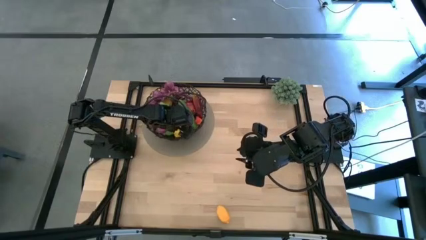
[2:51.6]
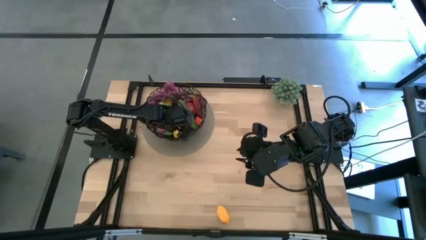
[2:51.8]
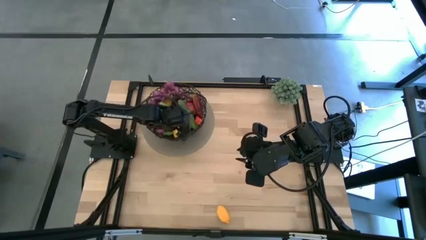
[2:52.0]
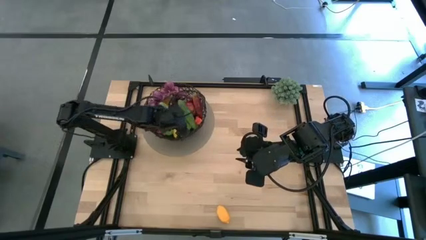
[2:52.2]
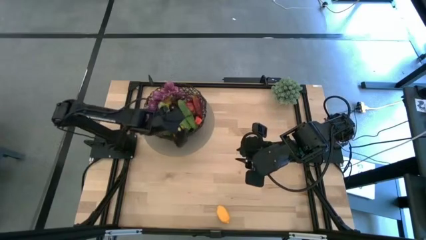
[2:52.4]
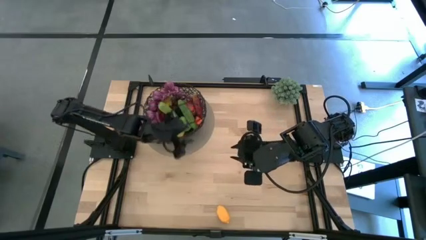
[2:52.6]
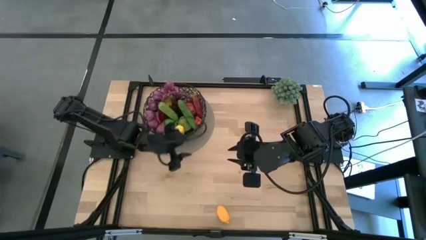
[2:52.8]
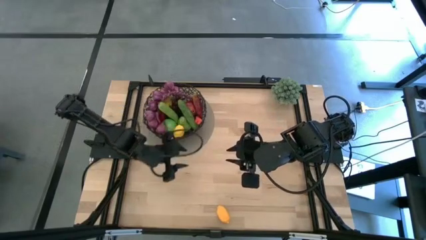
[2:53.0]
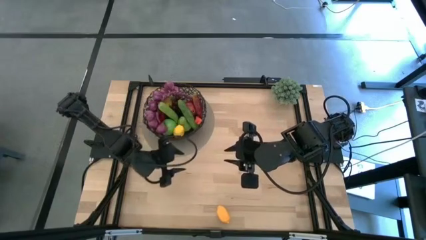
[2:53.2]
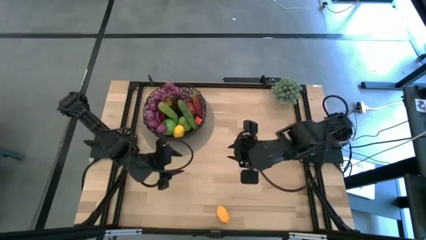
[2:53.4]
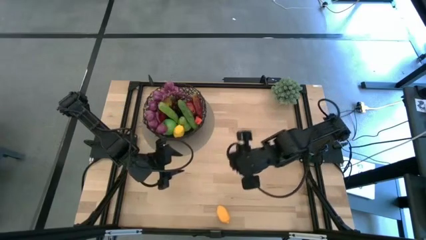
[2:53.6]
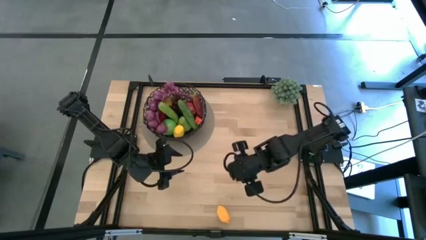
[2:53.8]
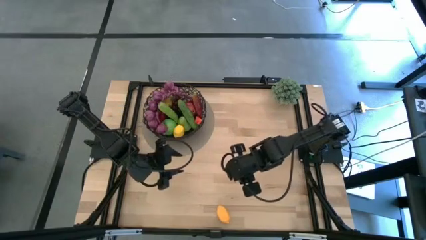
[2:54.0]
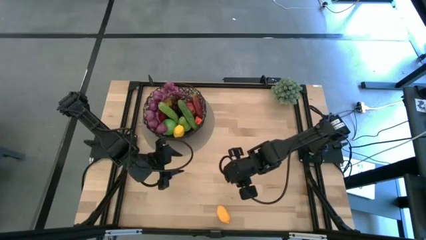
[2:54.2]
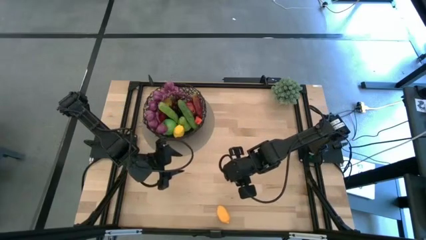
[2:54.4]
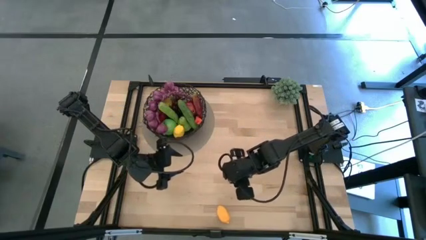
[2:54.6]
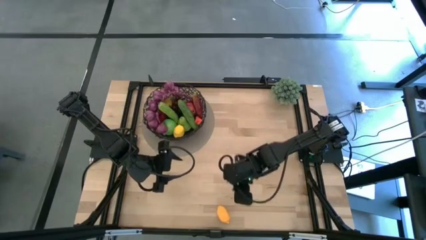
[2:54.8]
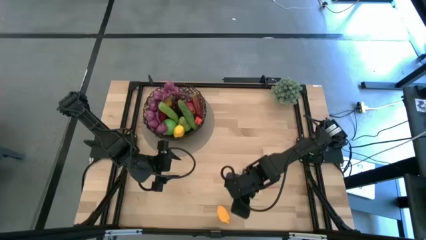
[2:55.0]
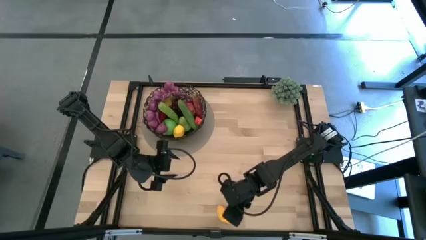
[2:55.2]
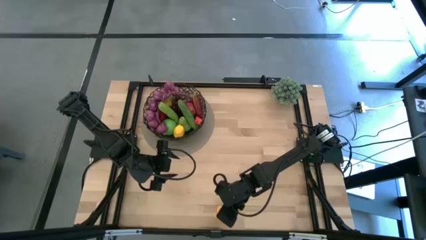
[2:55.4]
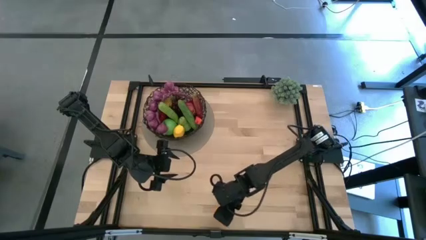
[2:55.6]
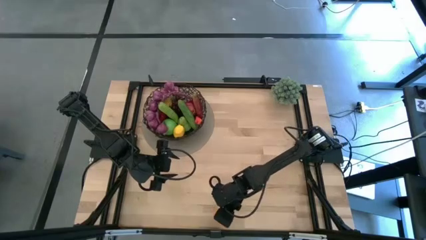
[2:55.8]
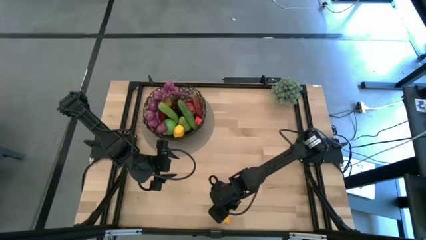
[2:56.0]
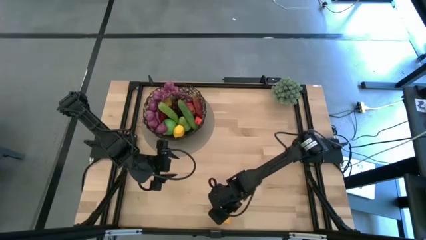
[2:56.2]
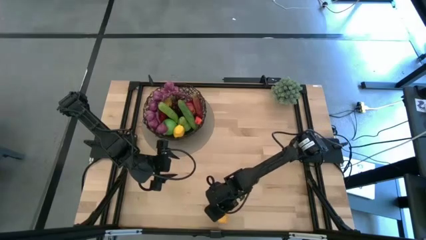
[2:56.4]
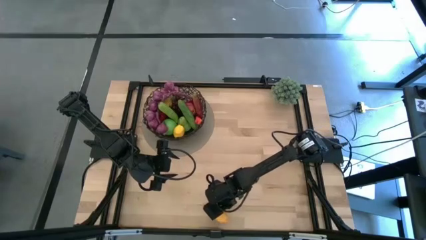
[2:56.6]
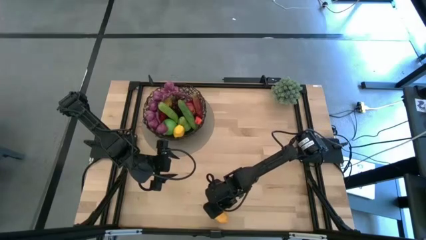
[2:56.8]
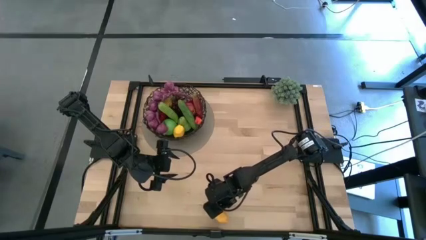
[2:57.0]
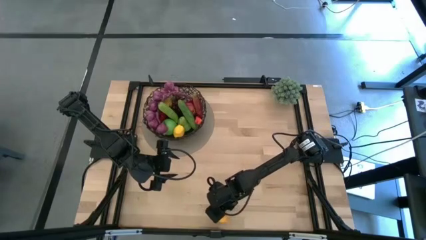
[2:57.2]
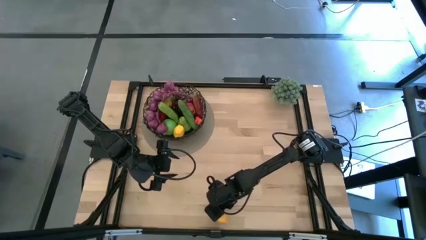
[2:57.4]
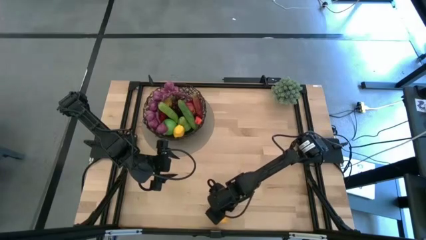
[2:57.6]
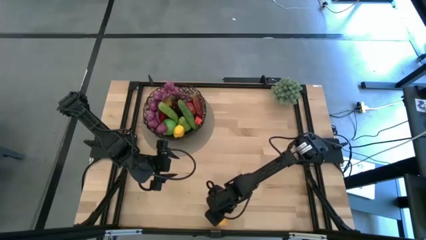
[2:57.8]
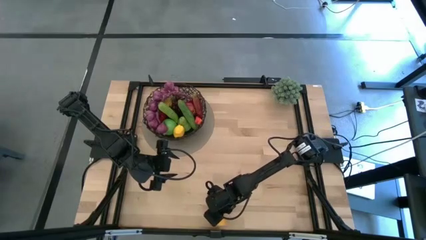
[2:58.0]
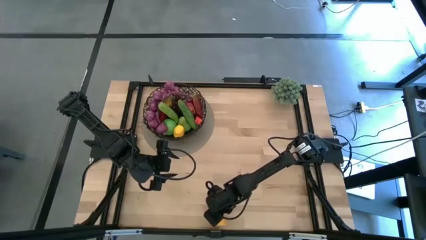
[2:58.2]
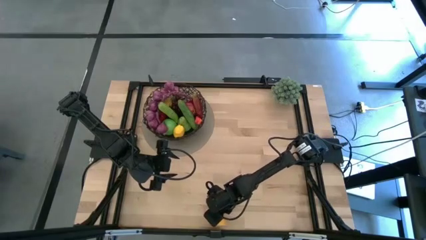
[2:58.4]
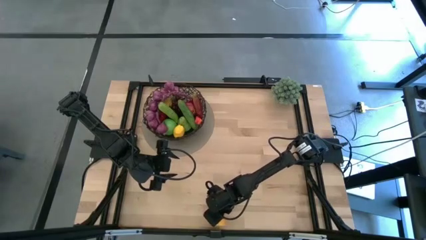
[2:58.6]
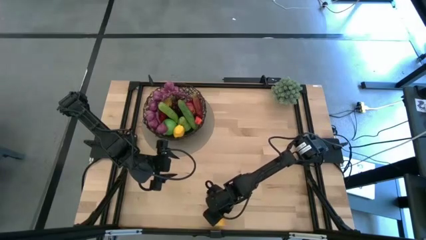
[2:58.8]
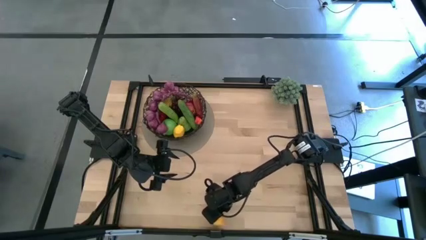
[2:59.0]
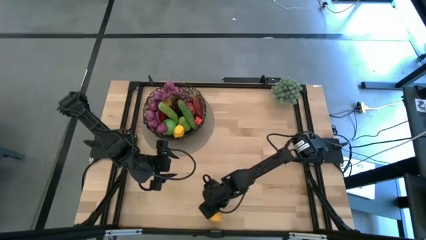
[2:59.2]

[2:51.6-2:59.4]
Task: Build produce basket
Put the yellow lemon into the black wire basket

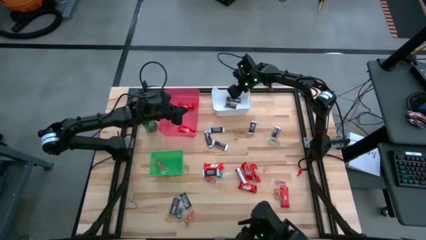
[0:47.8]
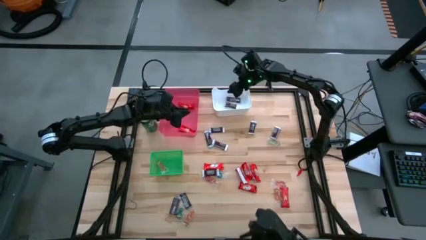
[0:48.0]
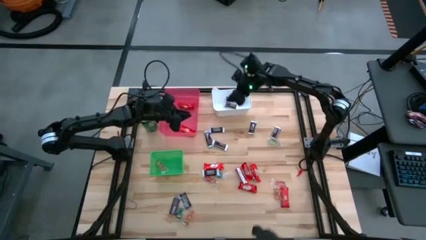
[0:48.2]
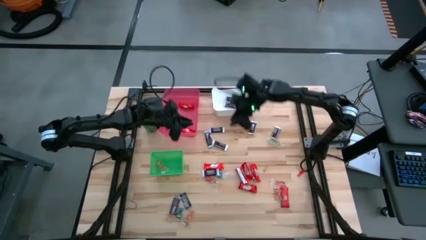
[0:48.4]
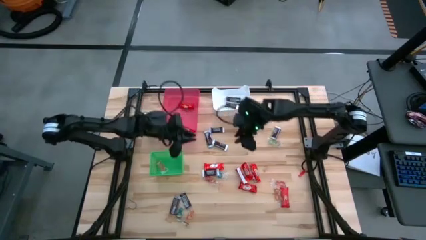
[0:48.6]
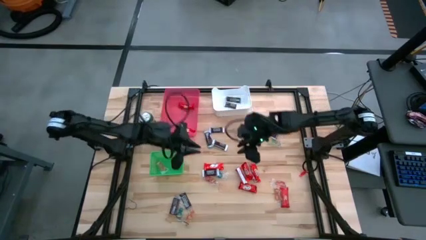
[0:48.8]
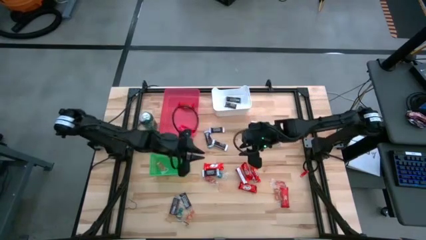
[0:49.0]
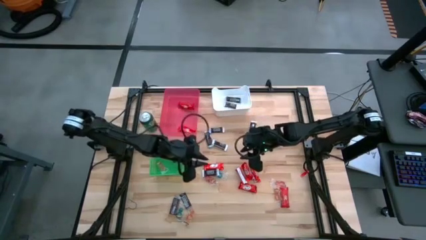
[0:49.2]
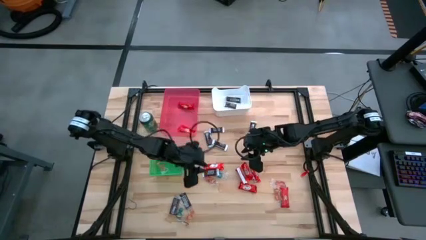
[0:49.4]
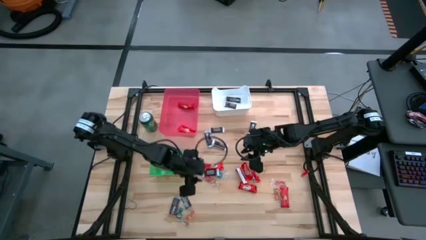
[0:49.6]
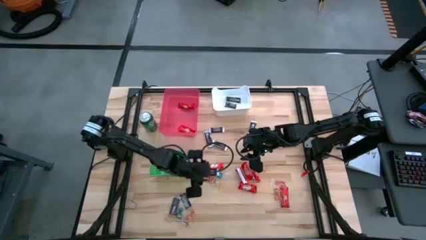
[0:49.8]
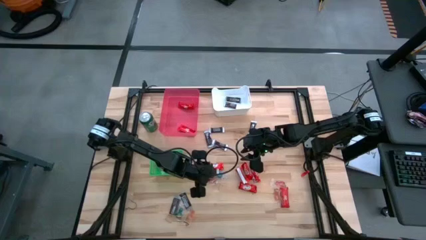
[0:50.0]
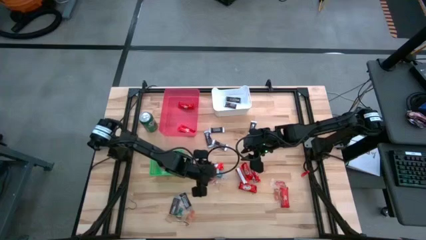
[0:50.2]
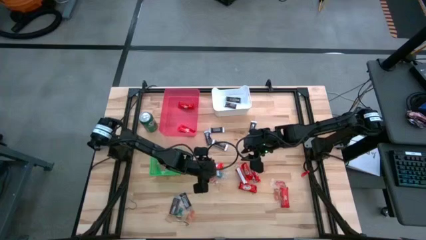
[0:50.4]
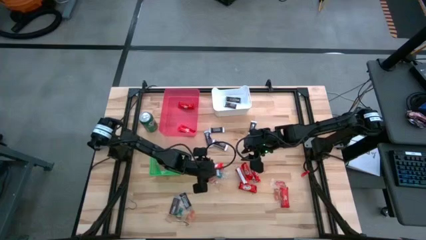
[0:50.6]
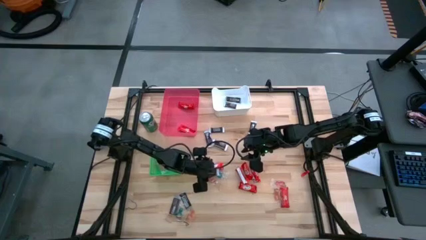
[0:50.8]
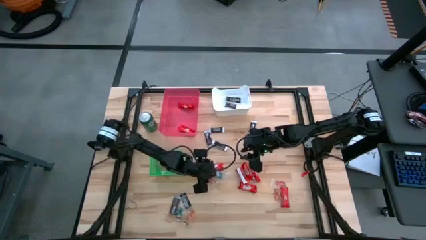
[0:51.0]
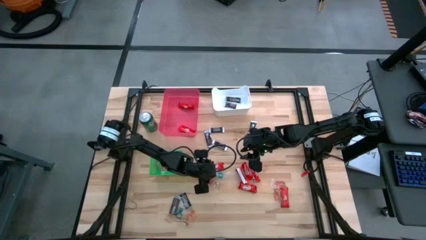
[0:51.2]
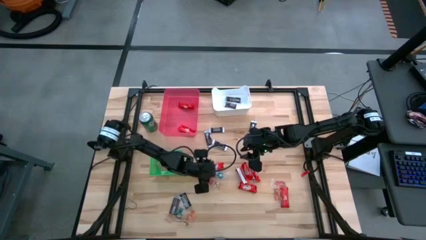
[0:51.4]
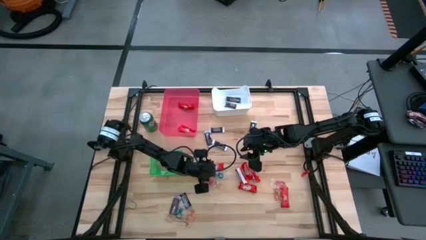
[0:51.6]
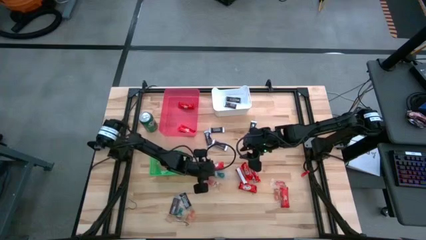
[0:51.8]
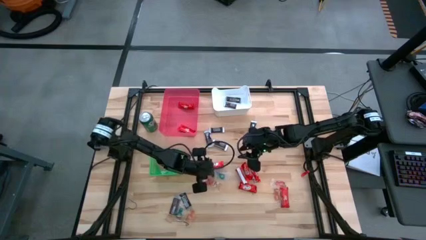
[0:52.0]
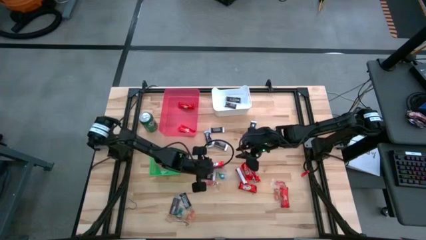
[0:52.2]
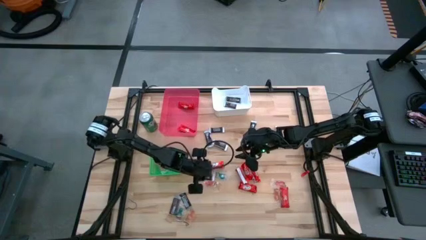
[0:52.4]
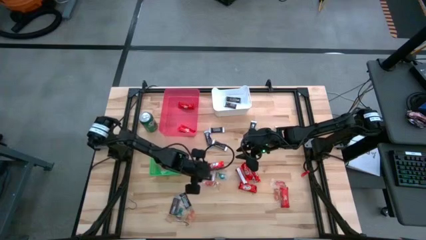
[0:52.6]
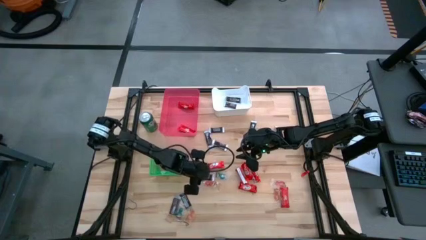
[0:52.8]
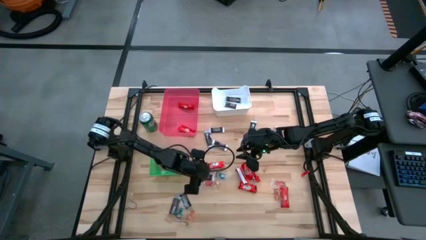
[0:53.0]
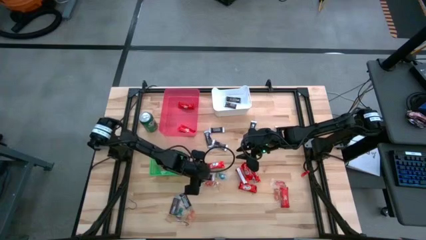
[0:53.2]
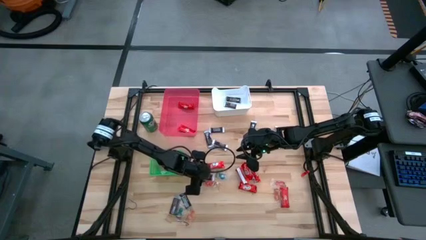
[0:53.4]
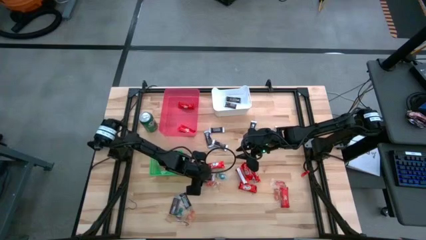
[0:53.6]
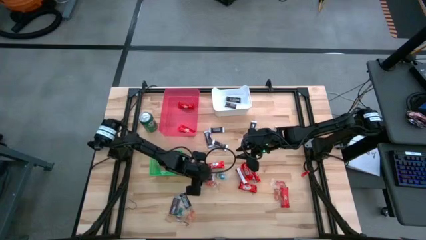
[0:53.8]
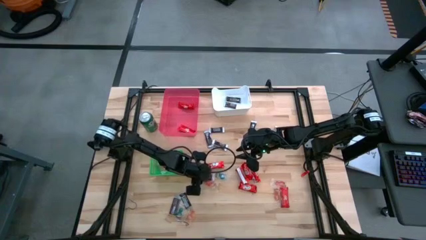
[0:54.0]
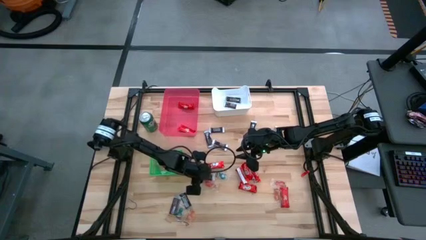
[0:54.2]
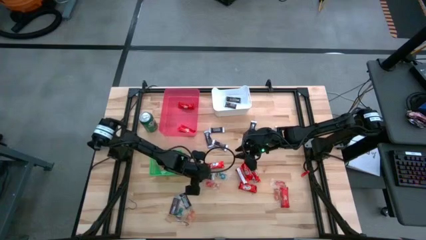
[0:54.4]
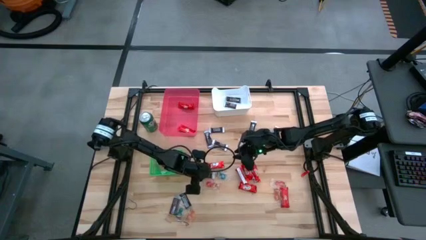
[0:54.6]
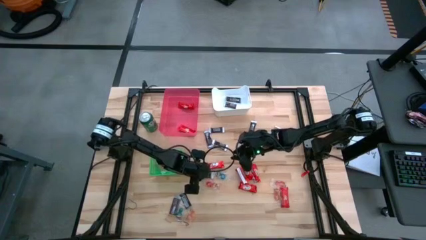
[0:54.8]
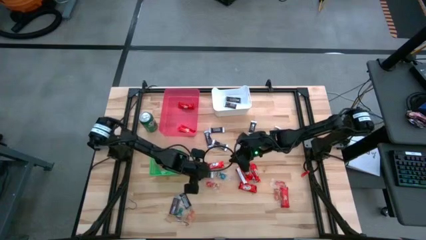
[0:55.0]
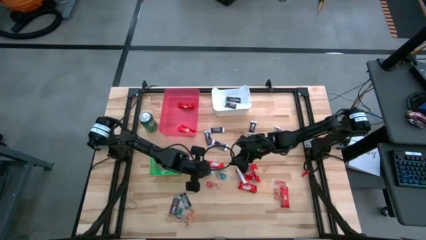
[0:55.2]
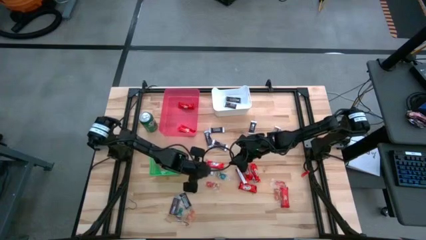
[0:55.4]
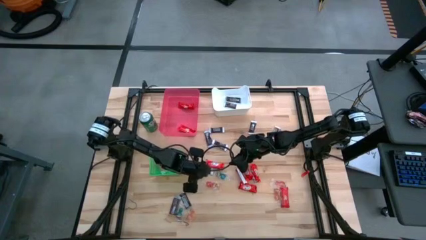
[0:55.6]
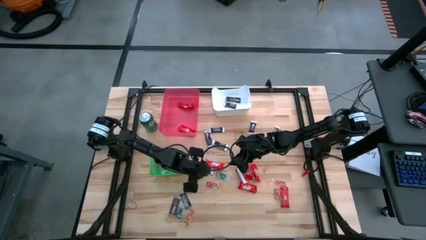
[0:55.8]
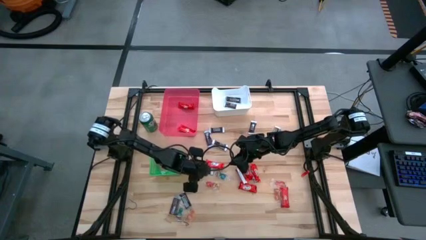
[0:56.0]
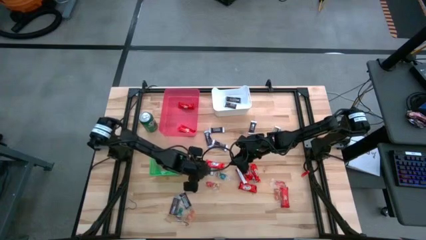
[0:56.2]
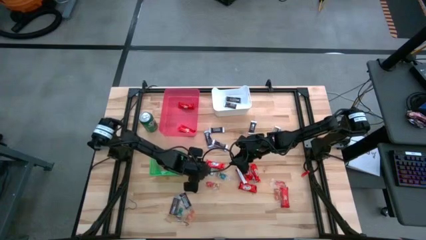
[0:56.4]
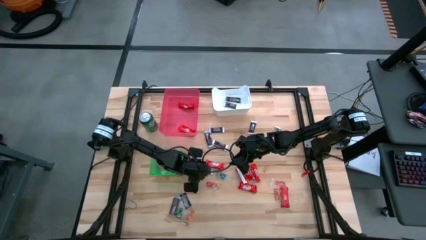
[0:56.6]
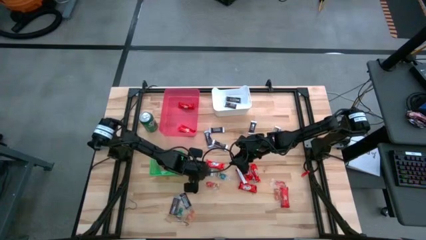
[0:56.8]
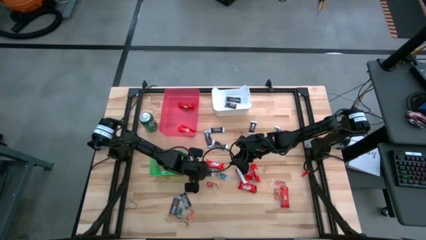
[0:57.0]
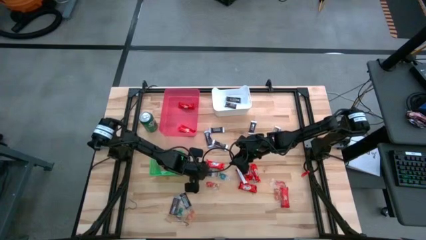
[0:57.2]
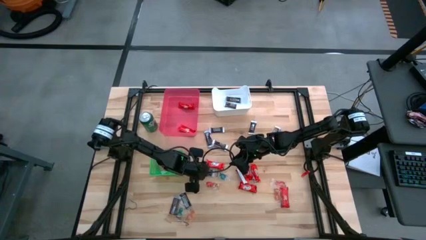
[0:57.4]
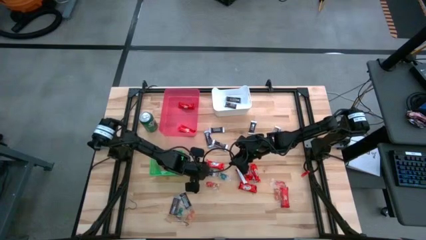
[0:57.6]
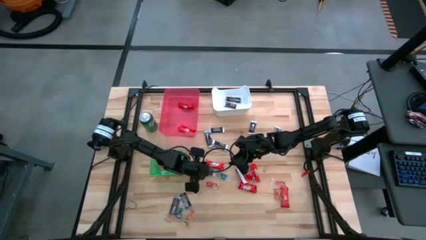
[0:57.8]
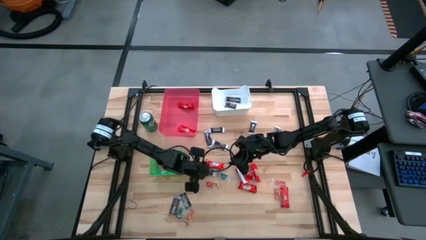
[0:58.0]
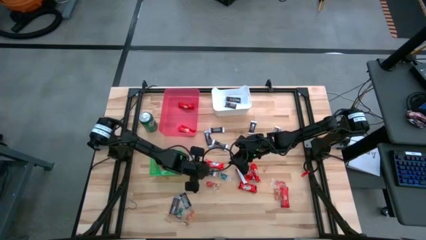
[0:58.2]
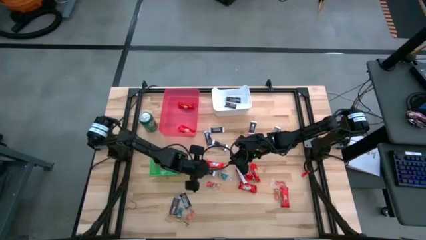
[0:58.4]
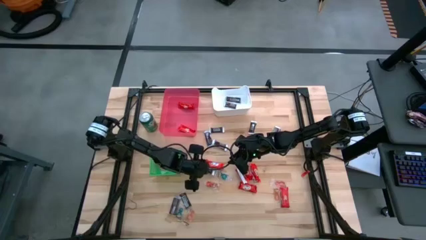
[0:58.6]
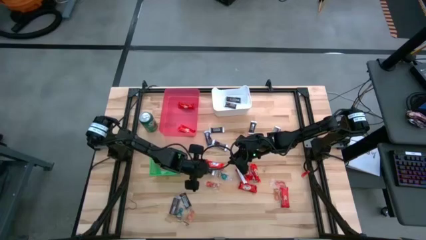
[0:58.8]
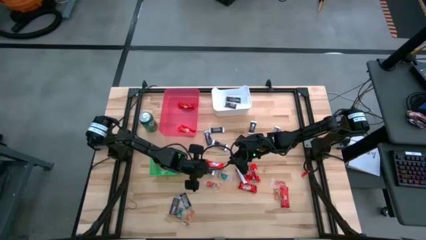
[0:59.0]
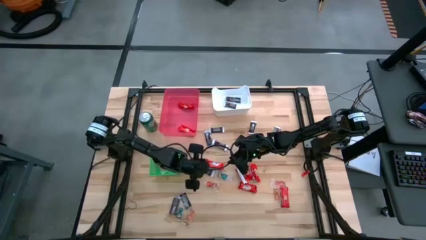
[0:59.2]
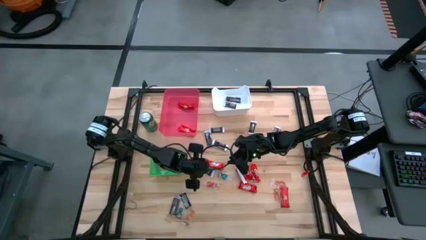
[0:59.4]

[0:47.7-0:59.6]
Task: Organize candy in baskets
Put the brown chocolate into the white bin
